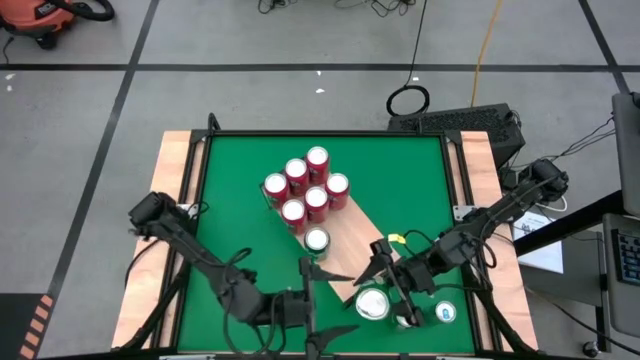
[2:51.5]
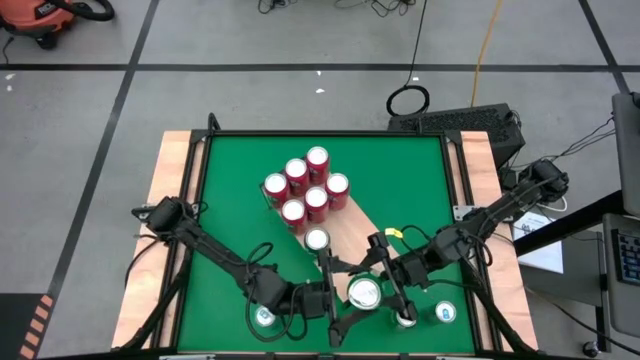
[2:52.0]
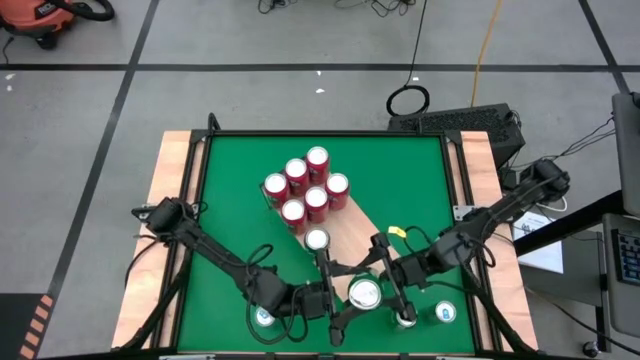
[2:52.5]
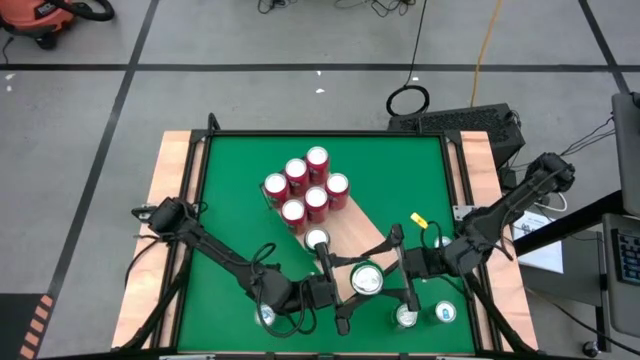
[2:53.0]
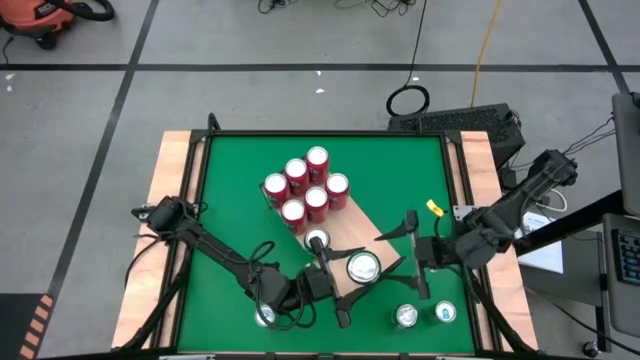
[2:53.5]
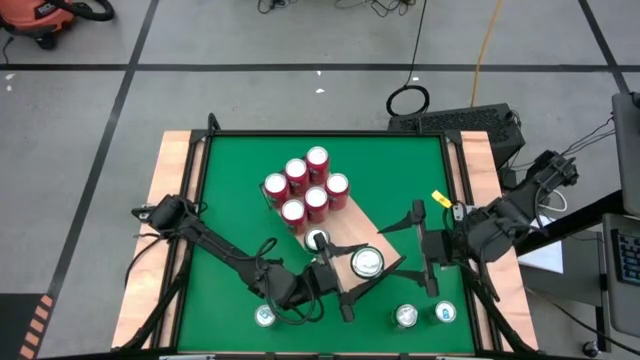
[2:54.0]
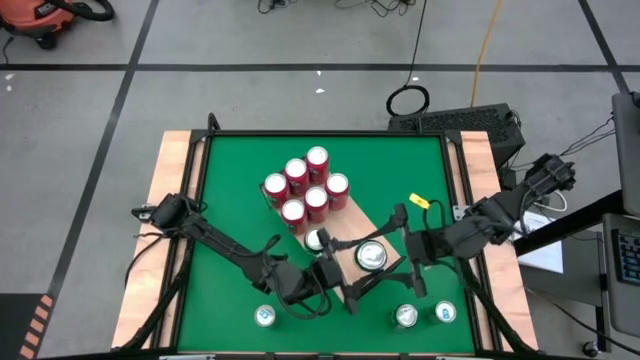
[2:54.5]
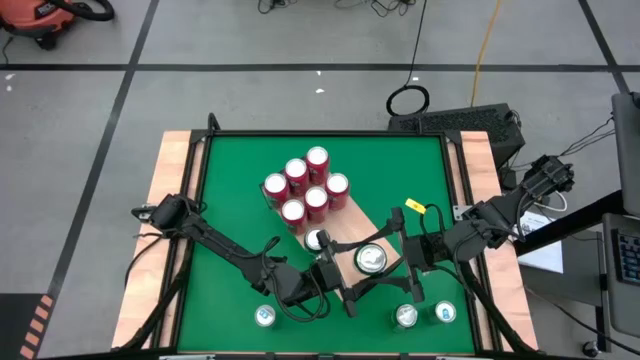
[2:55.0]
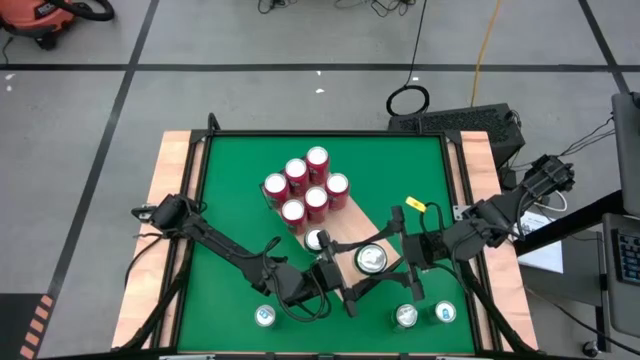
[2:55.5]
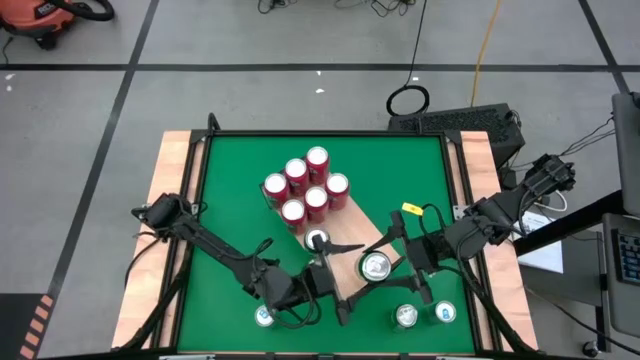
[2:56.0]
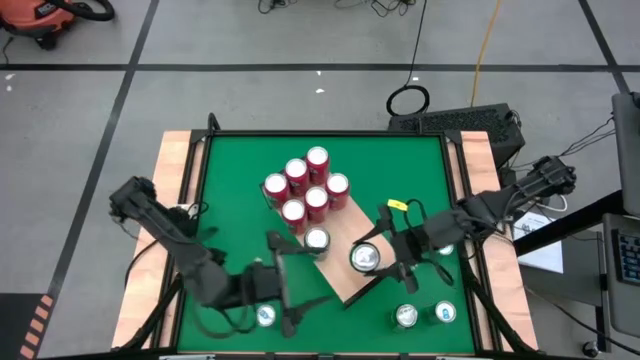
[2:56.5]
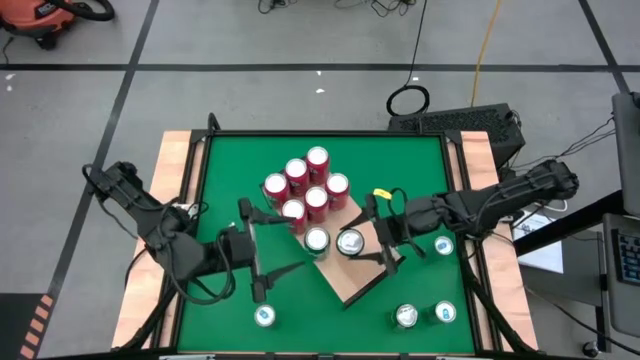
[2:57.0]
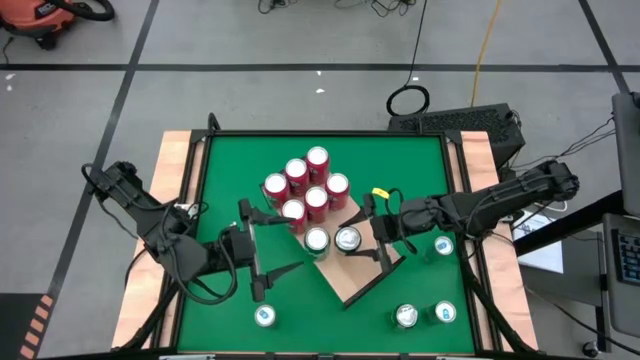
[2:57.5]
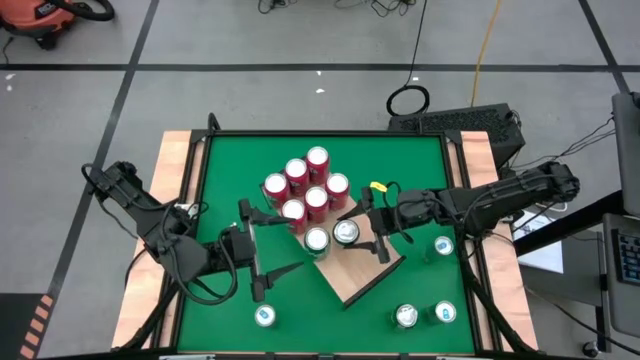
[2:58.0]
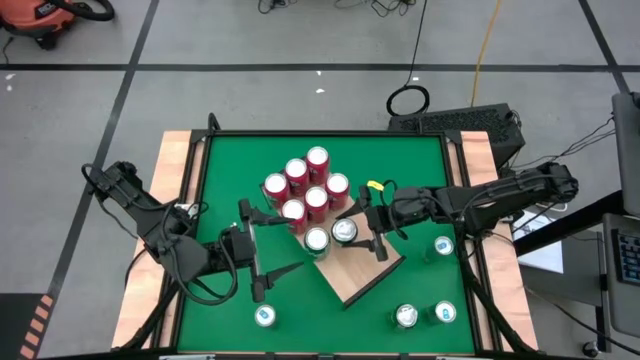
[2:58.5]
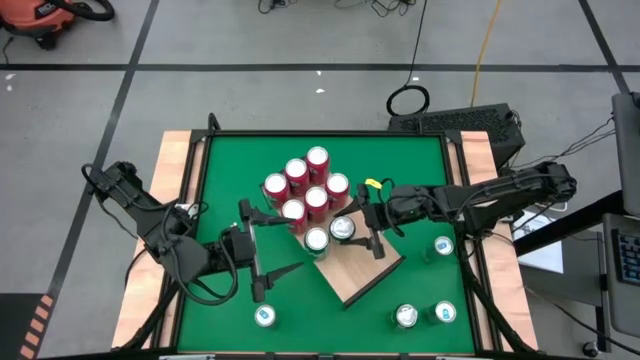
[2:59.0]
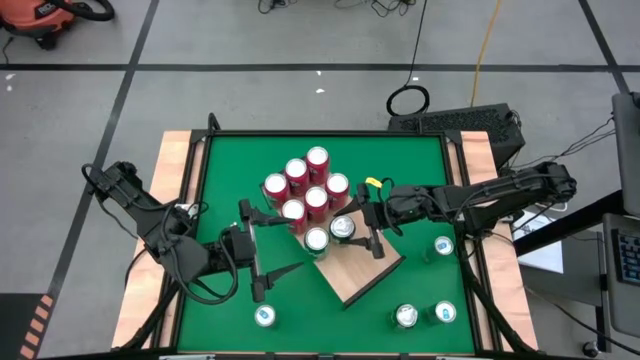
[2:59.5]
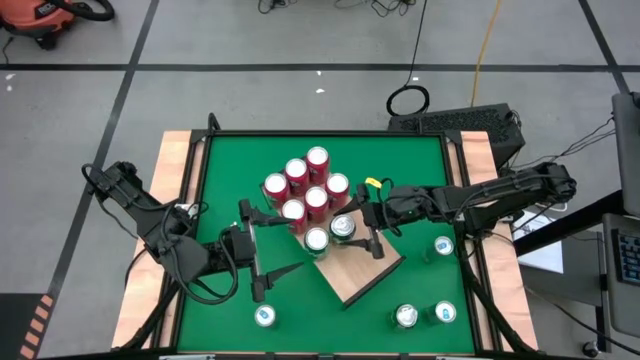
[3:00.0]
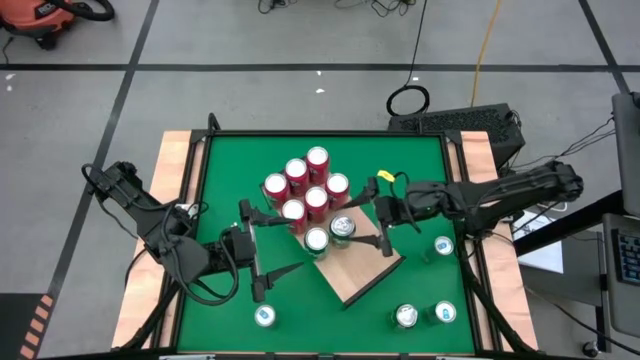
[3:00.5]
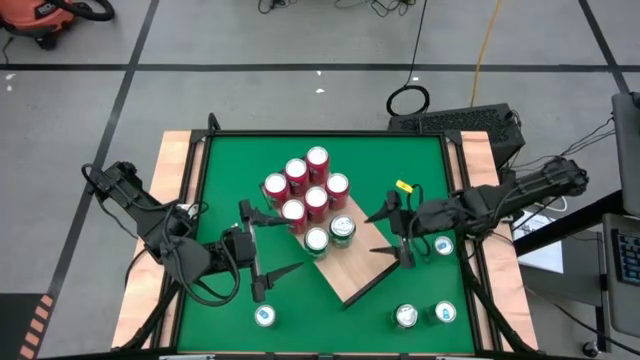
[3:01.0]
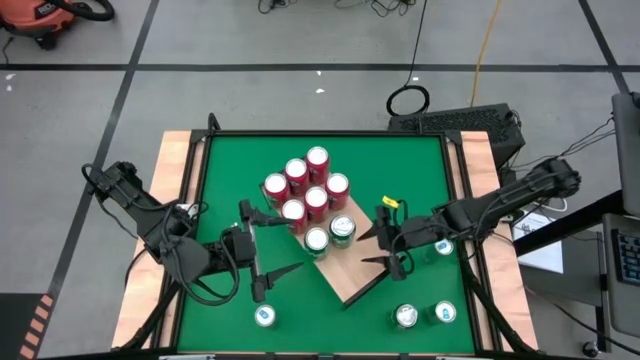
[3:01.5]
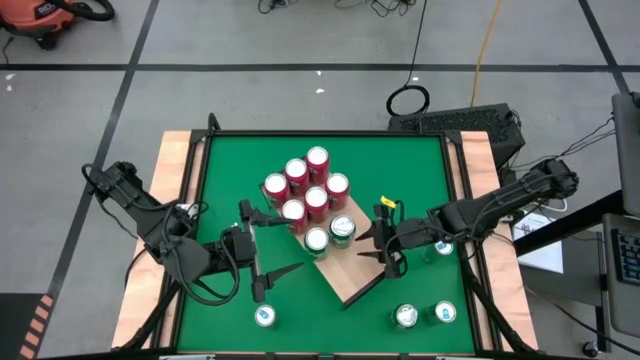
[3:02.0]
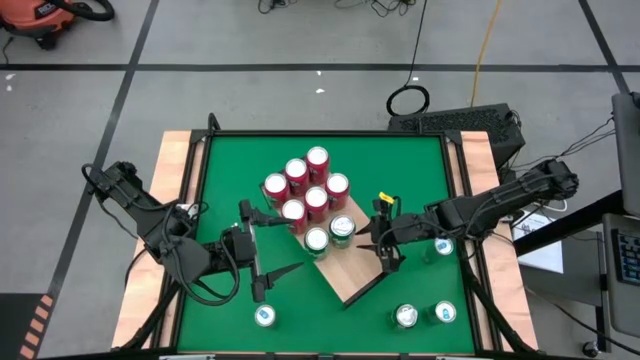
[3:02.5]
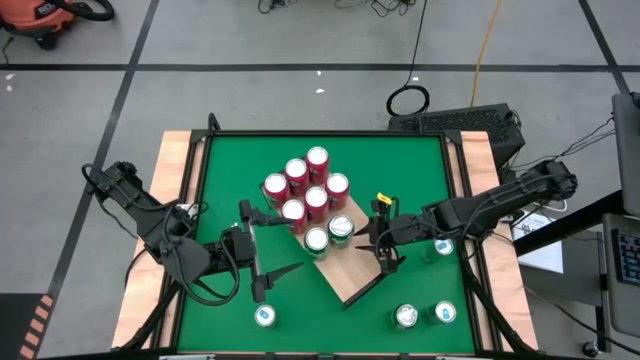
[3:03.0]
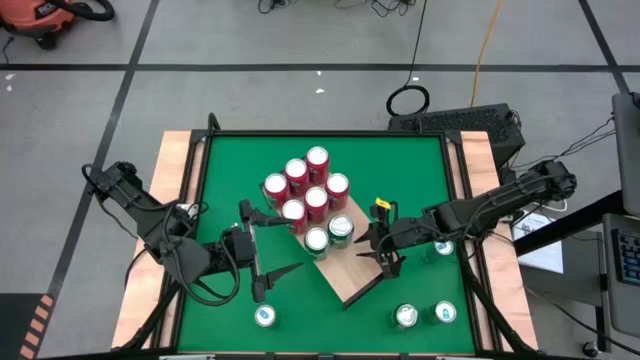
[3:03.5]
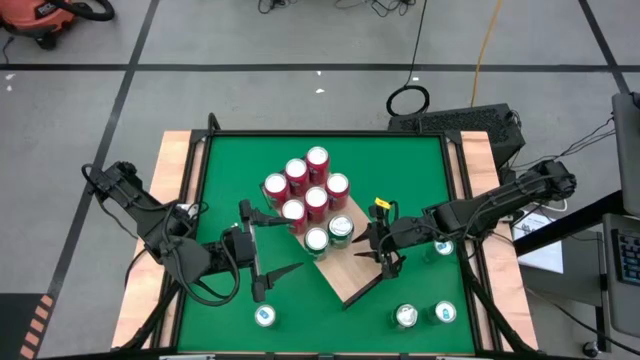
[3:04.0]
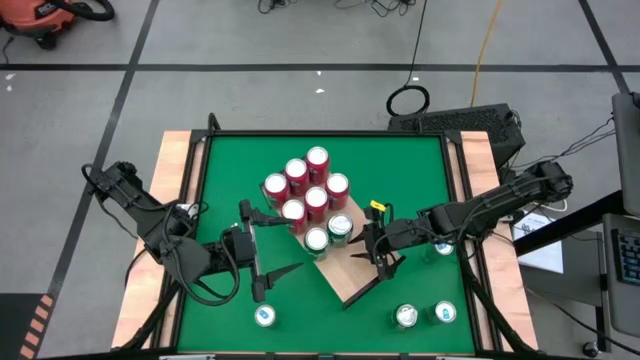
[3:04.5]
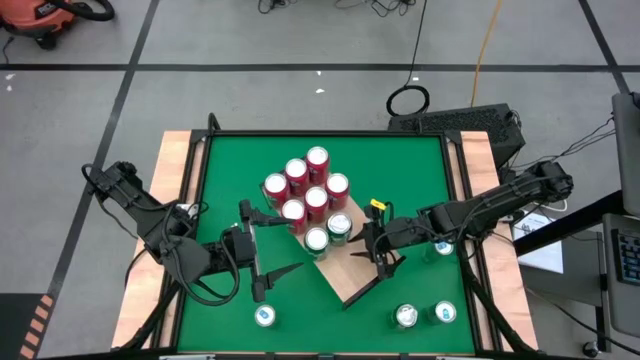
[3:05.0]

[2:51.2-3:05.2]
Task: Place canned beverage on shelf
Put the green soda can on the shelf aligned with the other green soda can

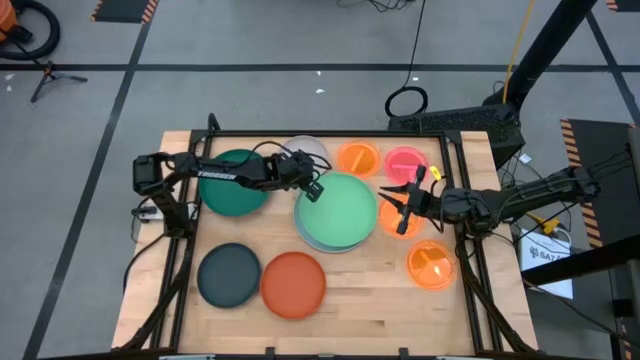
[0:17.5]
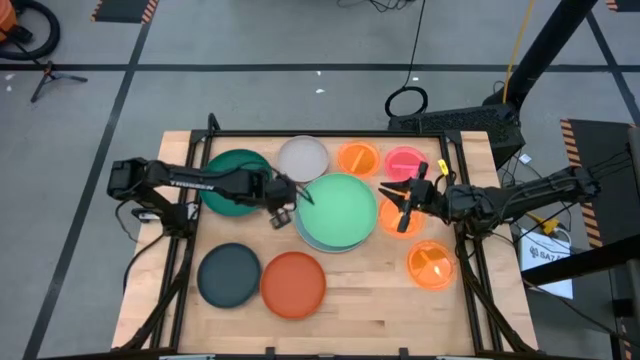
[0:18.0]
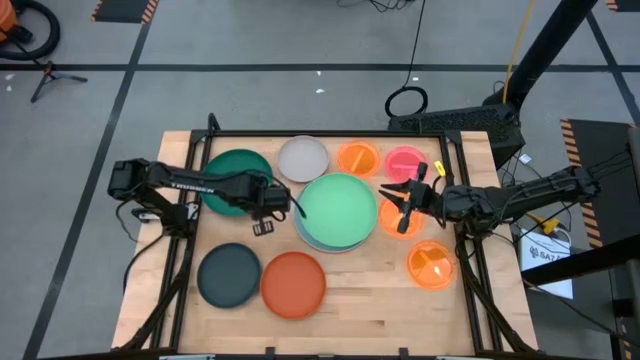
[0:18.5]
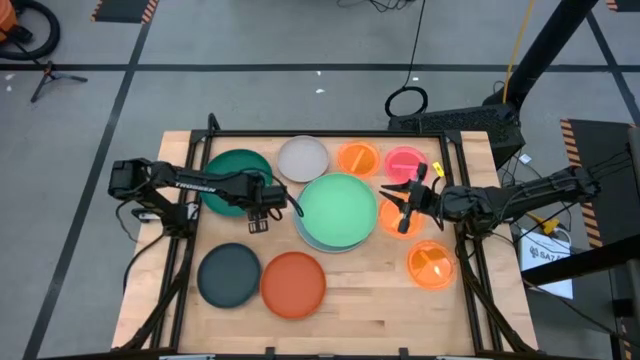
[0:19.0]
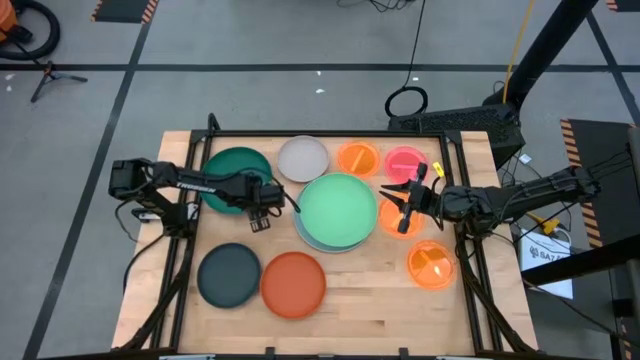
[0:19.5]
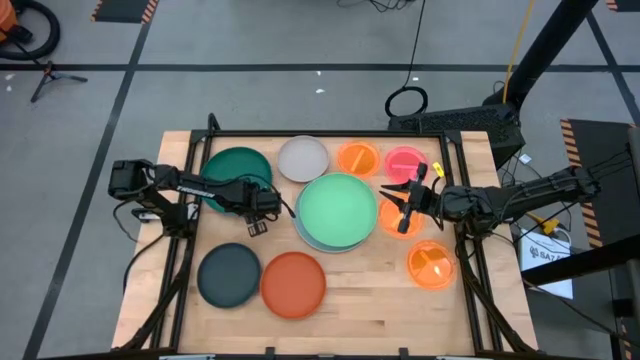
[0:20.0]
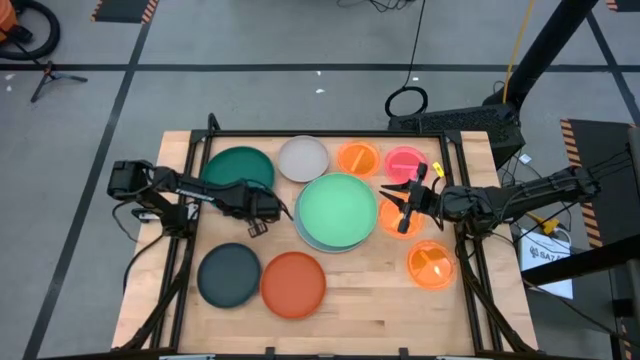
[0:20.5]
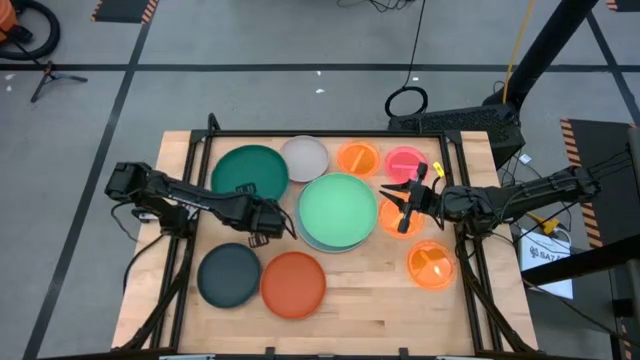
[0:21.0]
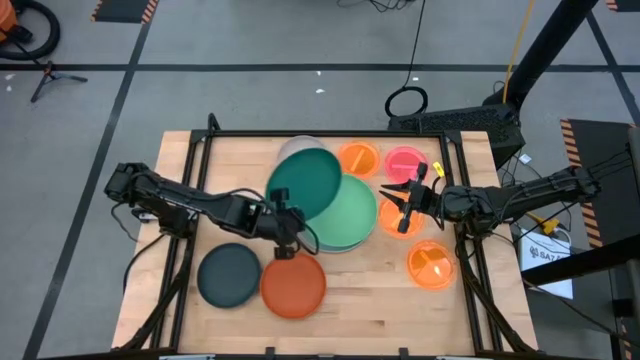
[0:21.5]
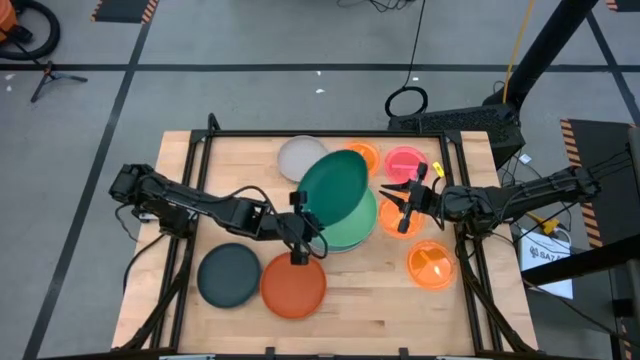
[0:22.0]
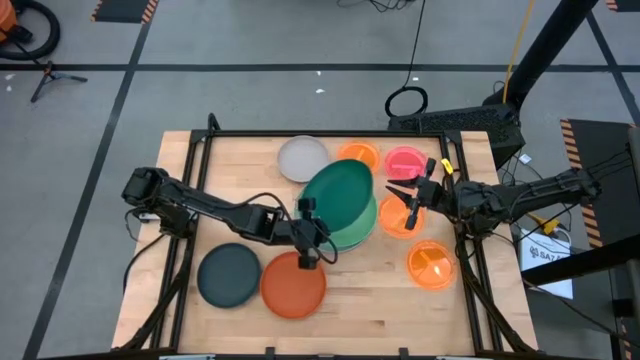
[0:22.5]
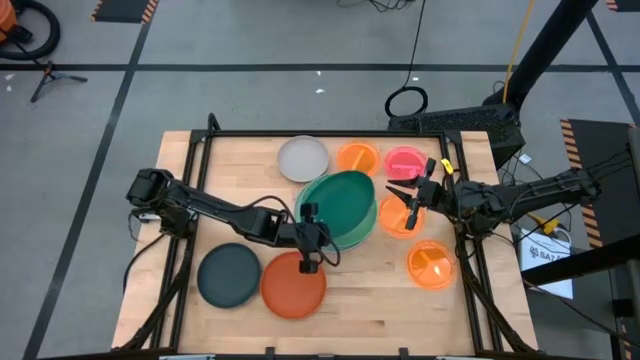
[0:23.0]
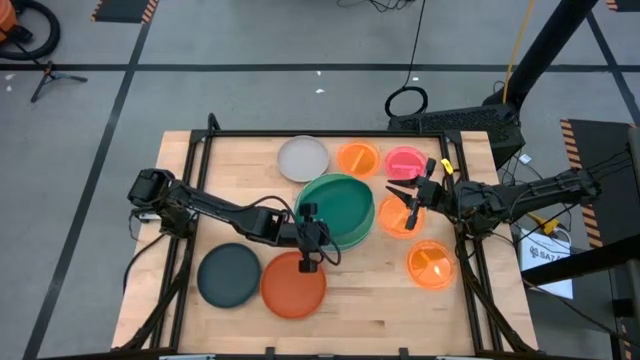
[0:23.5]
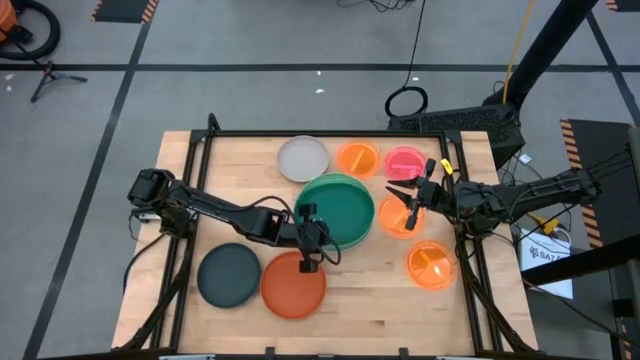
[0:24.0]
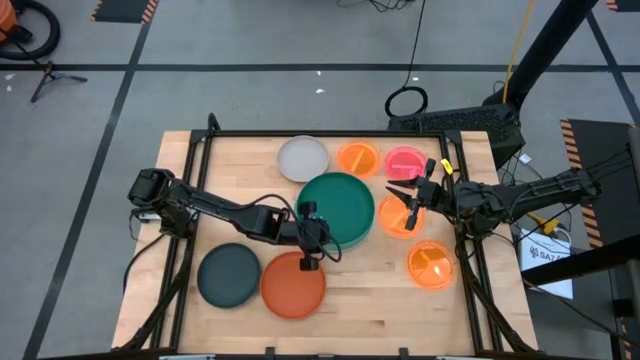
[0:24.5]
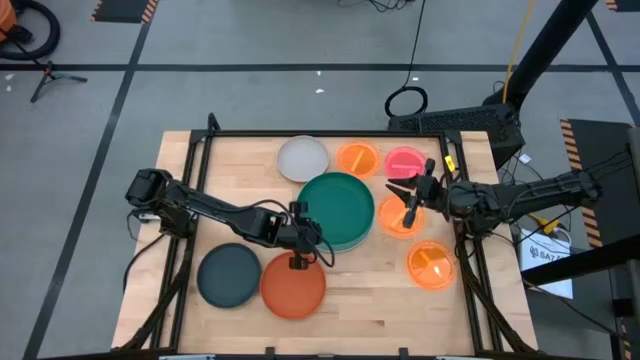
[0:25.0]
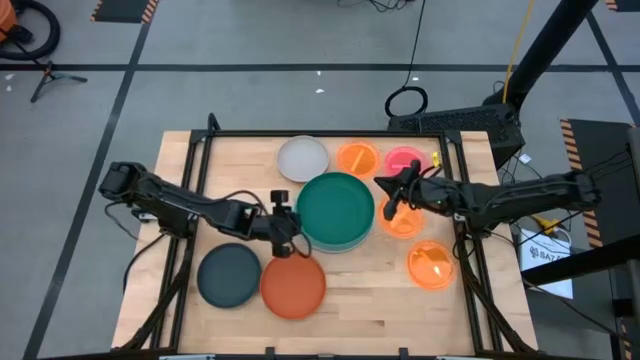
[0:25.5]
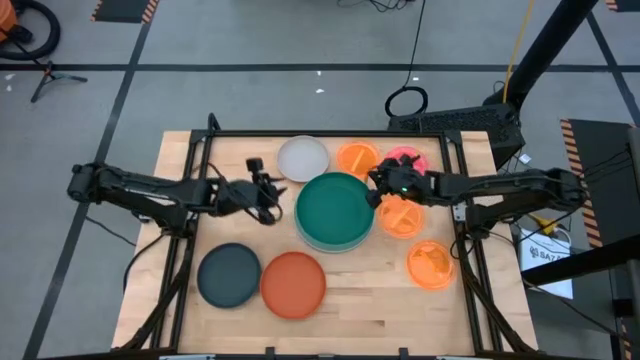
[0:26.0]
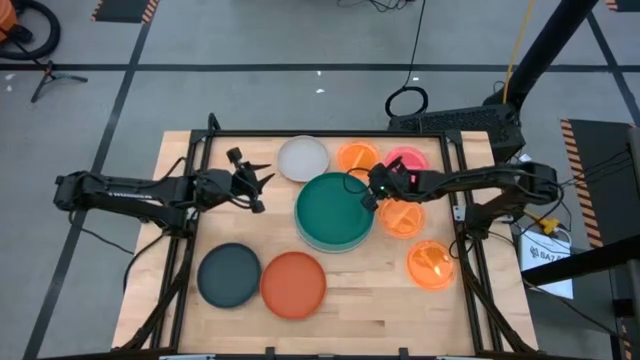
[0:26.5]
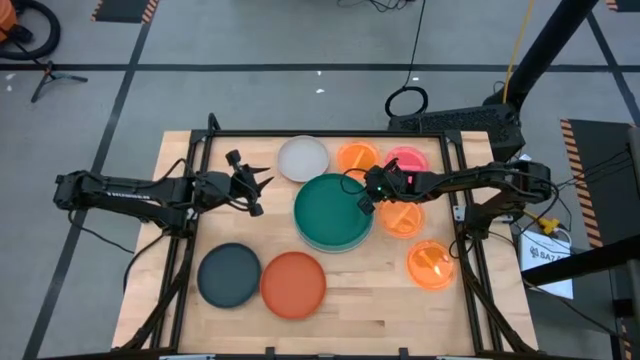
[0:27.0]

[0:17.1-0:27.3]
Task: Stack plastic plates
Stack the green plate on top of the light green plate
